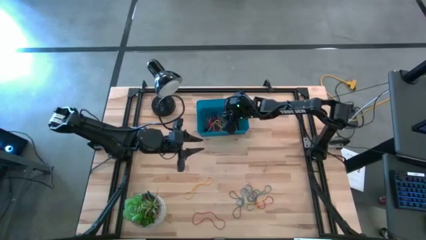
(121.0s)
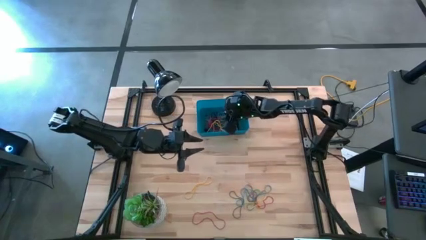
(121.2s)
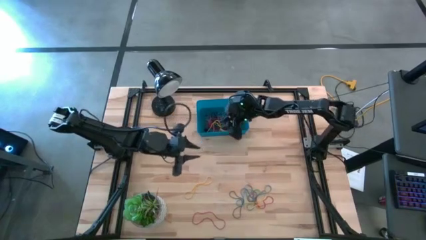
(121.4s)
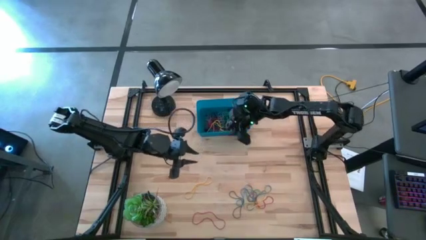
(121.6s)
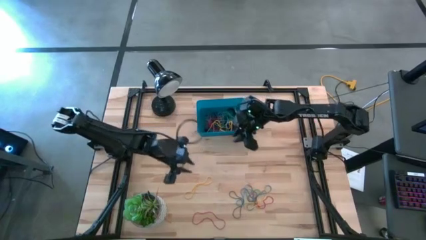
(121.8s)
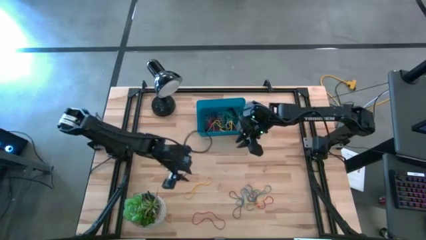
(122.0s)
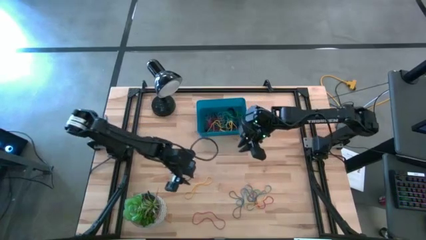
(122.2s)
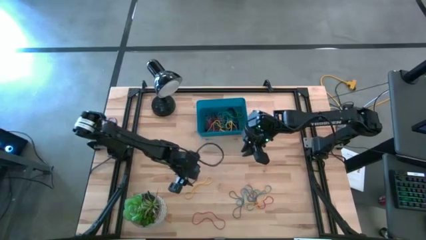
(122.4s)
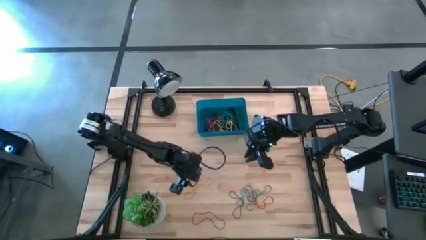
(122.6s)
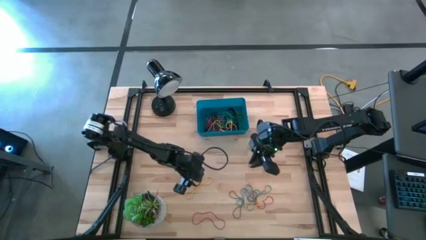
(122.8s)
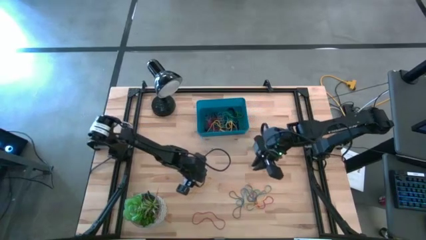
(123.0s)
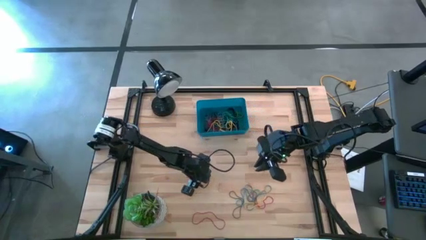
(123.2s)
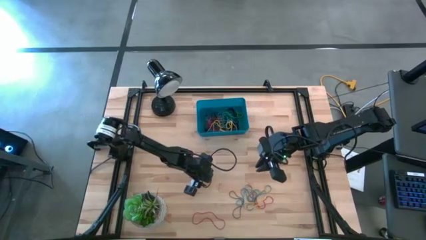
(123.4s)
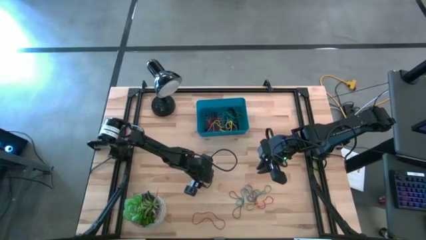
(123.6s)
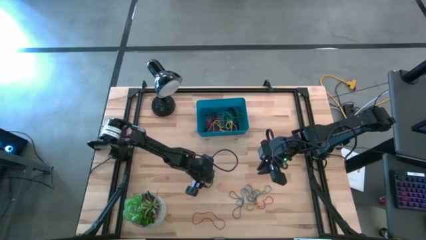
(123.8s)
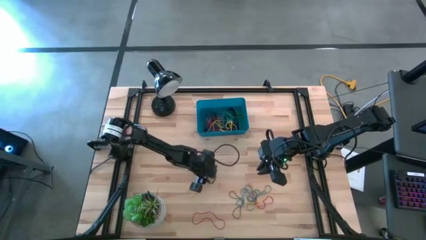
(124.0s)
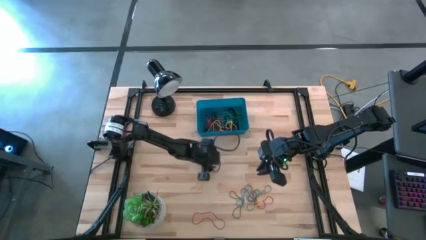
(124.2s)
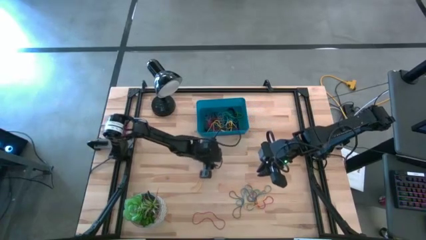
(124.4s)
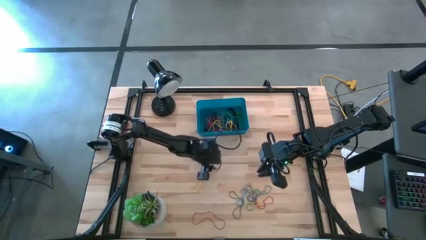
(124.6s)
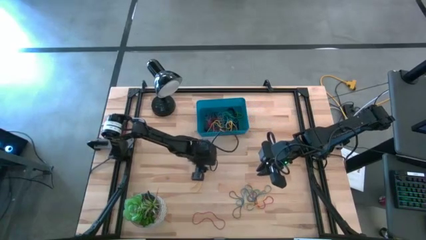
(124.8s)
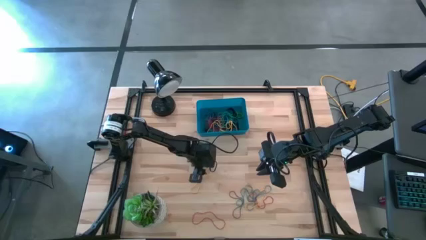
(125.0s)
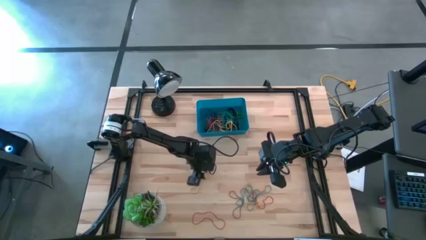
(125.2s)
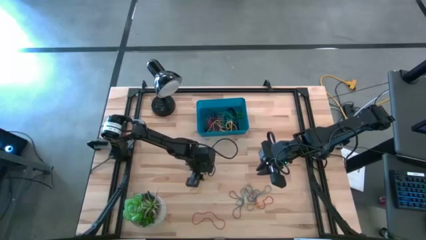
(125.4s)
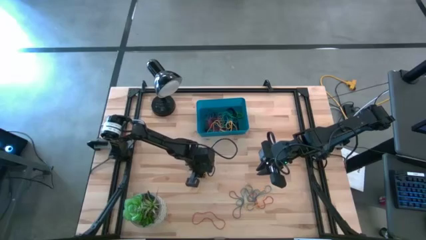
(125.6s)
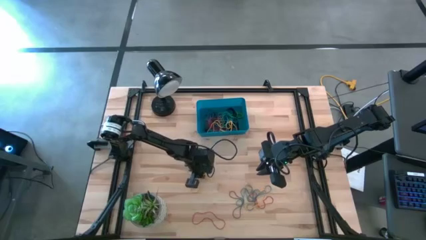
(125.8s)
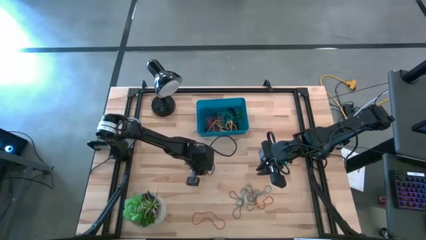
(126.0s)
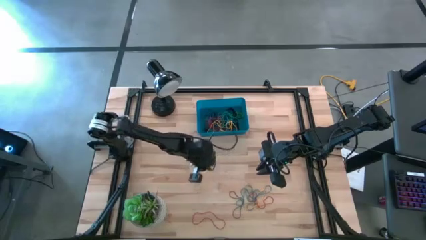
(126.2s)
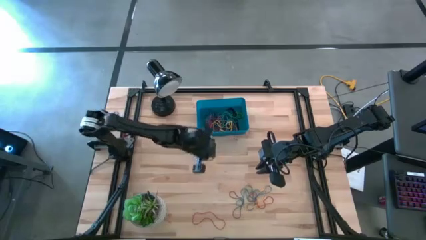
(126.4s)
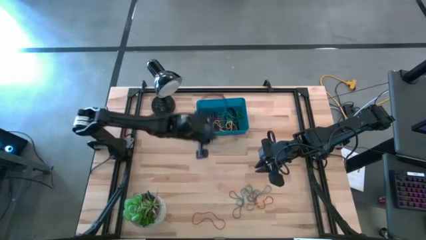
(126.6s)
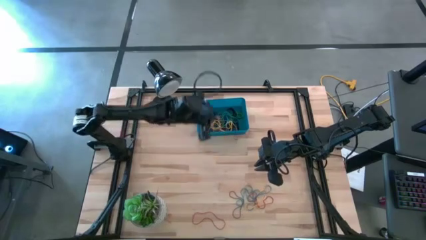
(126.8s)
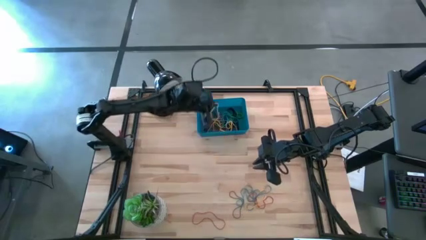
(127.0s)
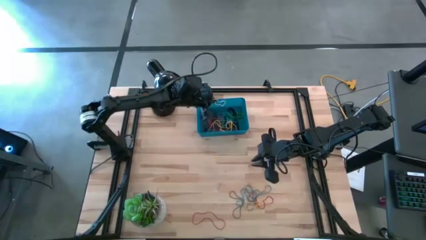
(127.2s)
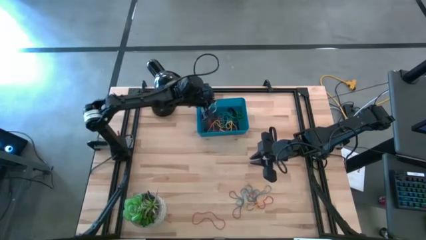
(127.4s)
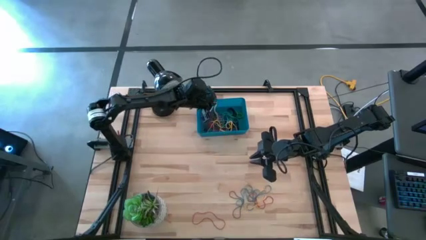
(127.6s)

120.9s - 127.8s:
Task: Pick and place rubber bands into bin
Put the yellow rubber band into the blue bin

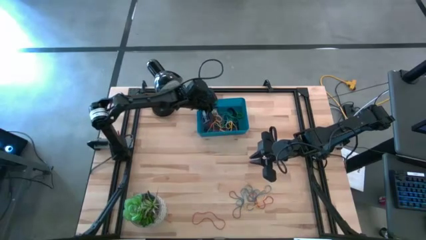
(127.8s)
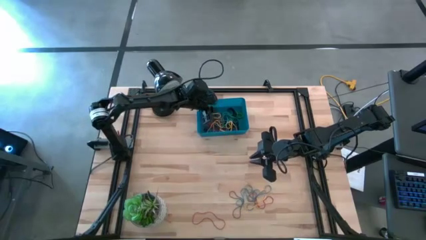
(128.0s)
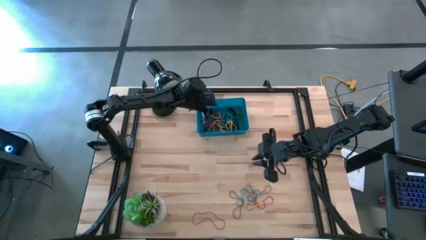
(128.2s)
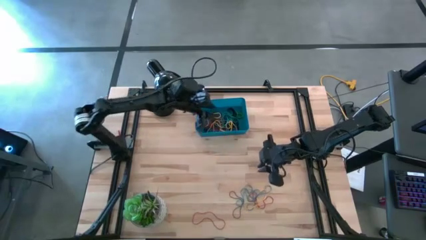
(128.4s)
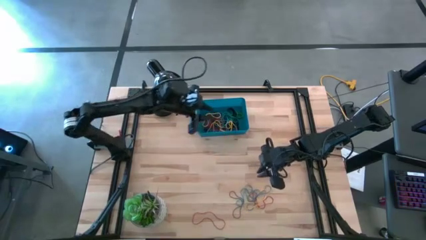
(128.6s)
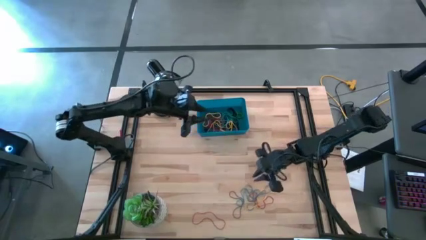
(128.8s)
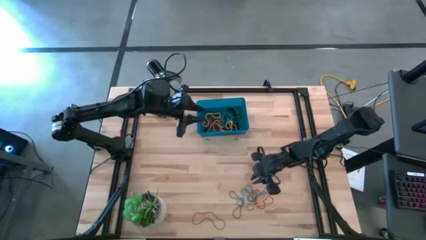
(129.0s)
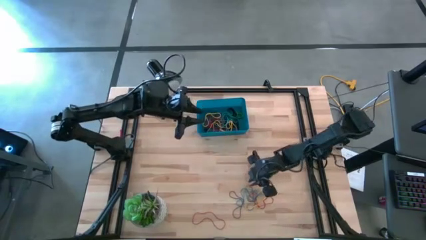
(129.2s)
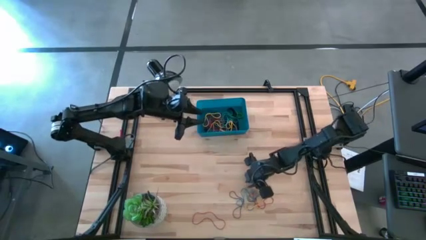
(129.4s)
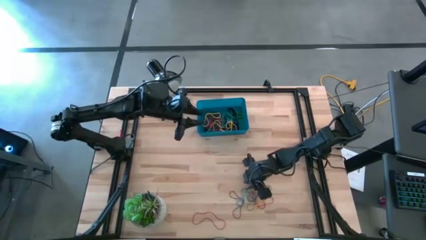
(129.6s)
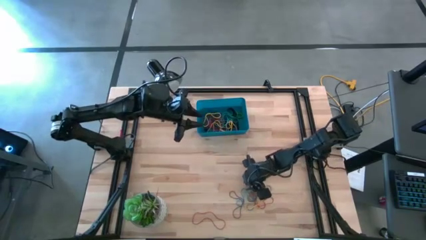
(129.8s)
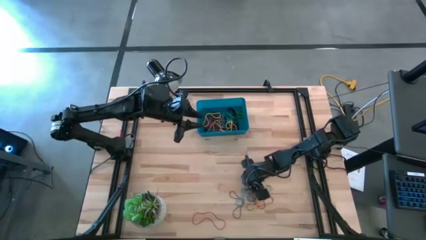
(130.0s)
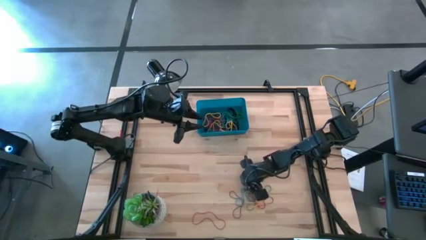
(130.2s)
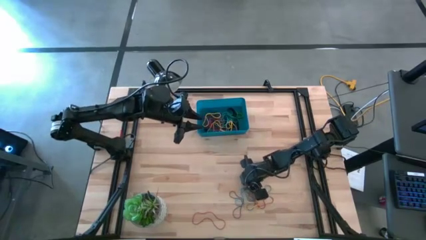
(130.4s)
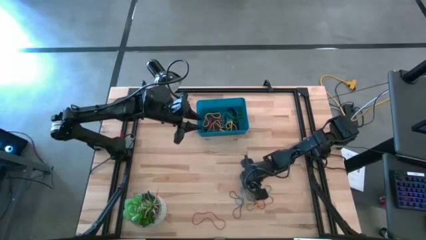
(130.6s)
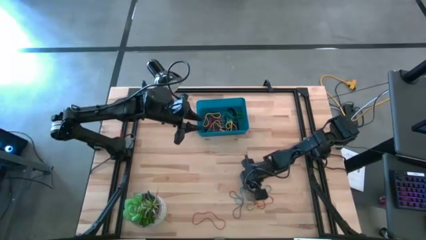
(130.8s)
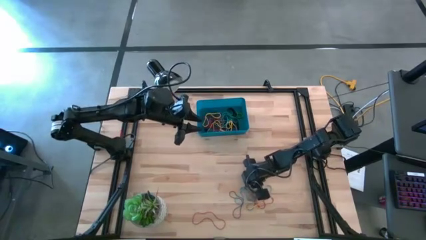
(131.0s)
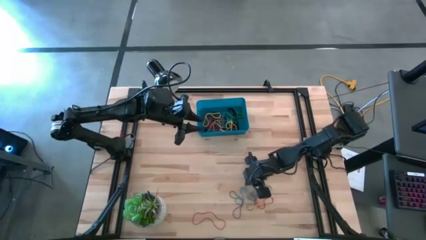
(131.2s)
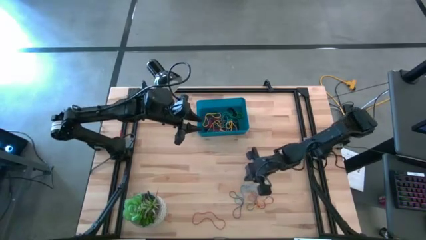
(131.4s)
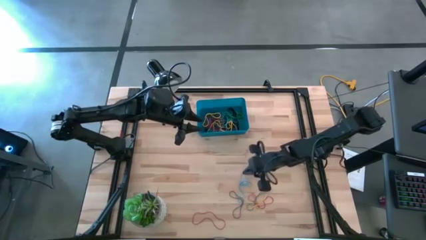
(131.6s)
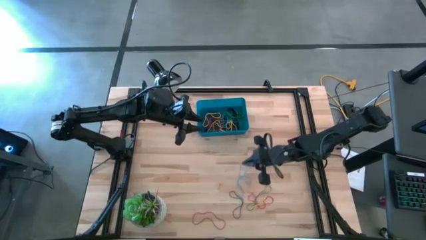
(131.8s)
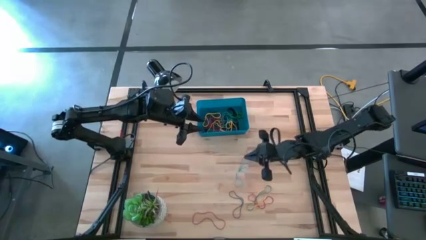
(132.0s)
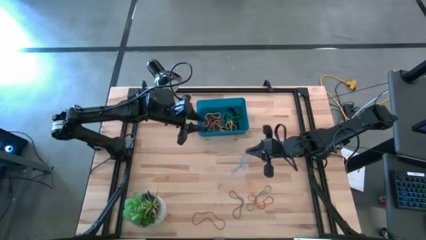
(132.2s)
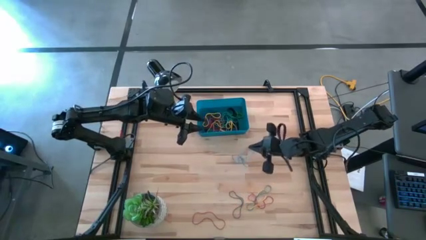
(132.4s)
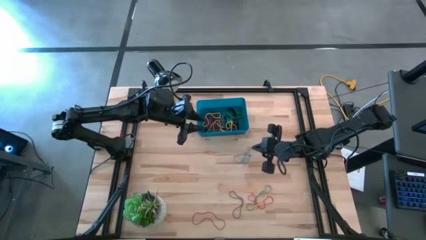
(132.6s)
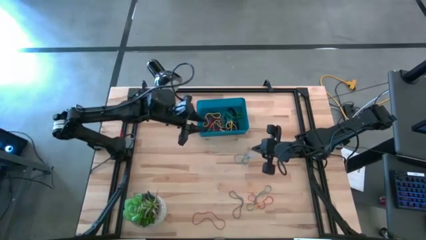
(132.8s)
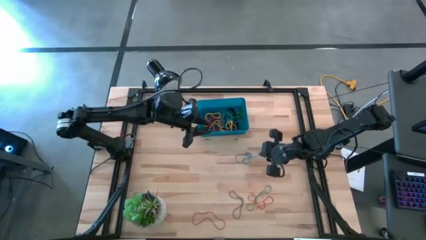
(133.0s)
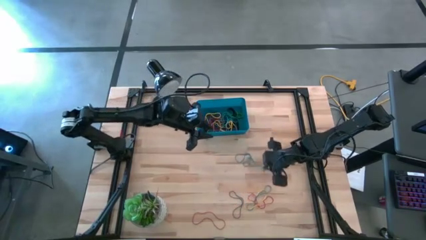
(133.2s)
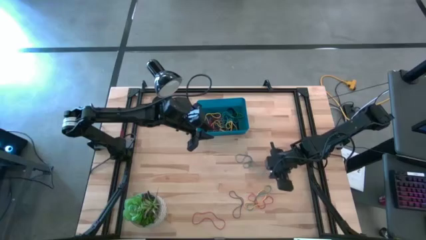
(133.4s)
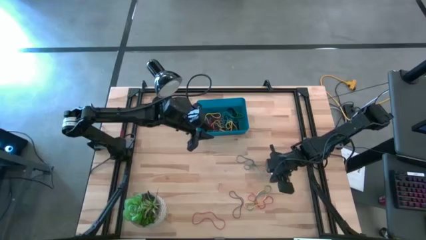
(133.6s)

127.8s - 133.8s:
Put the blue rubber band into the blue bin

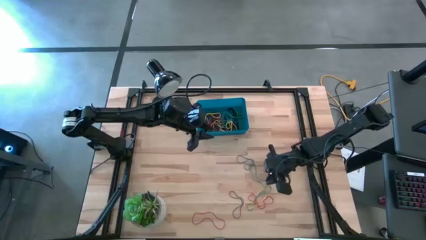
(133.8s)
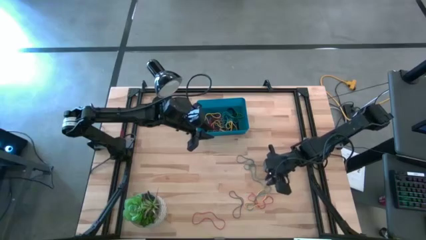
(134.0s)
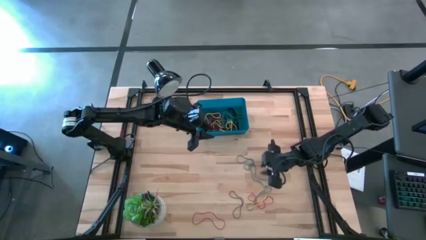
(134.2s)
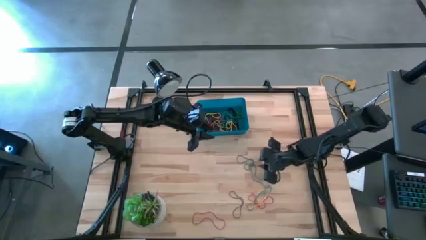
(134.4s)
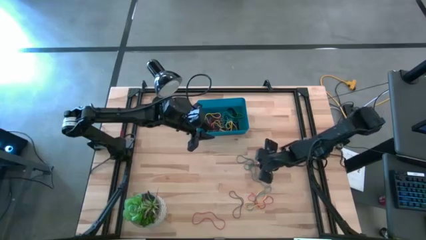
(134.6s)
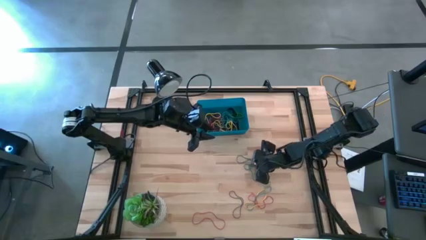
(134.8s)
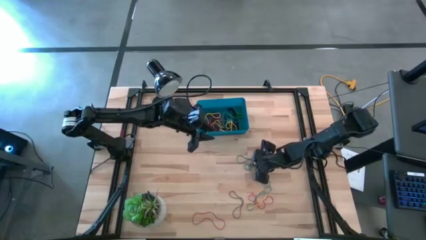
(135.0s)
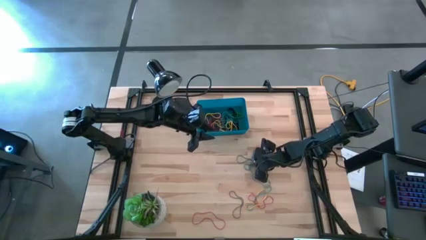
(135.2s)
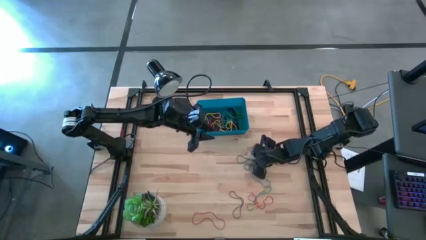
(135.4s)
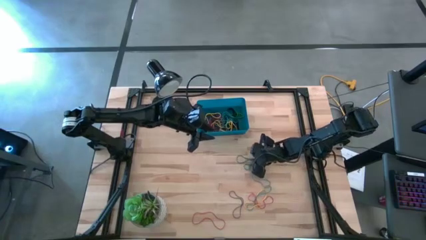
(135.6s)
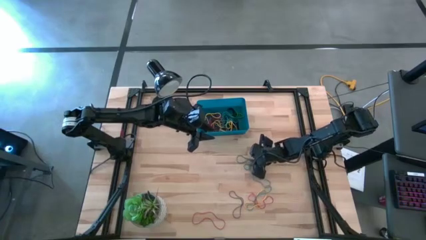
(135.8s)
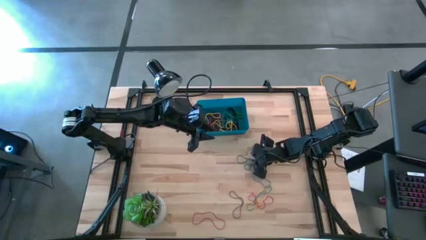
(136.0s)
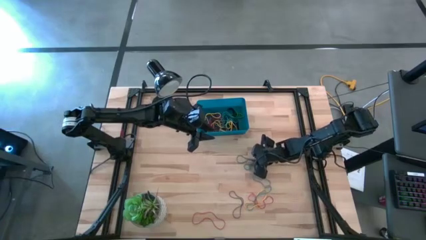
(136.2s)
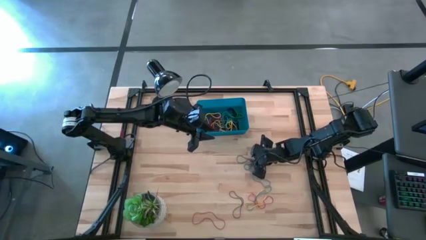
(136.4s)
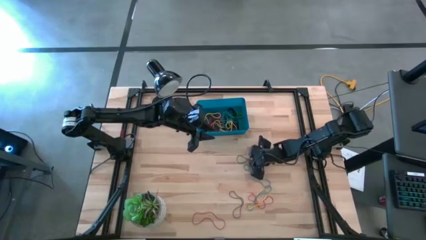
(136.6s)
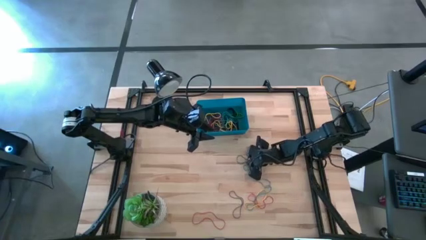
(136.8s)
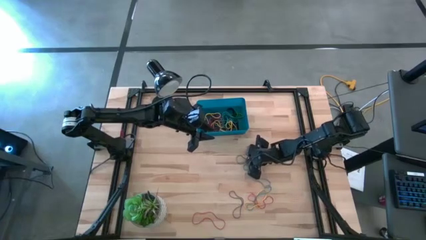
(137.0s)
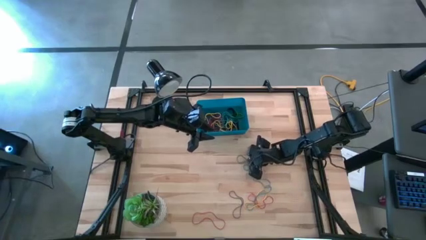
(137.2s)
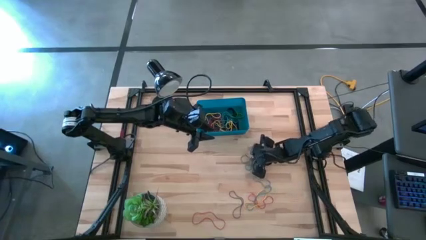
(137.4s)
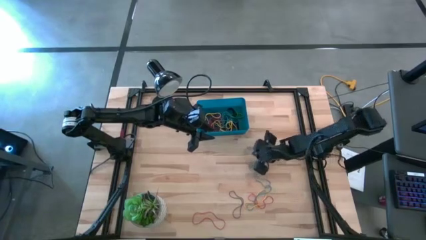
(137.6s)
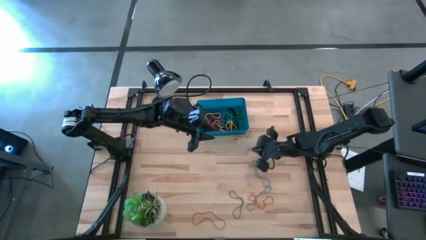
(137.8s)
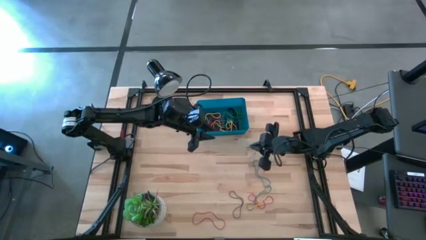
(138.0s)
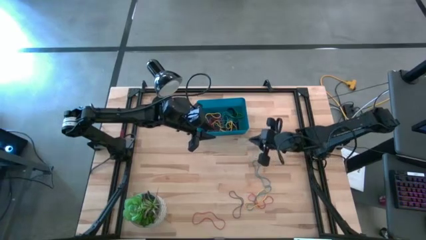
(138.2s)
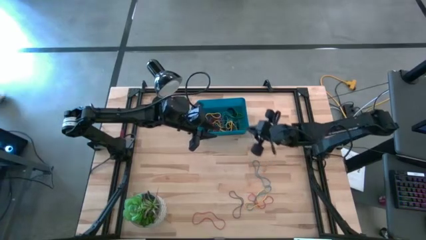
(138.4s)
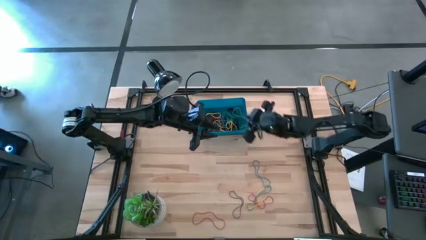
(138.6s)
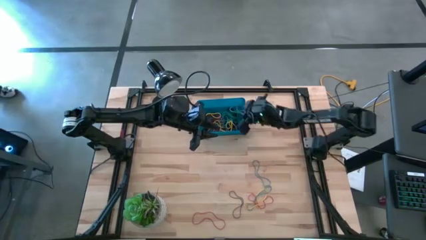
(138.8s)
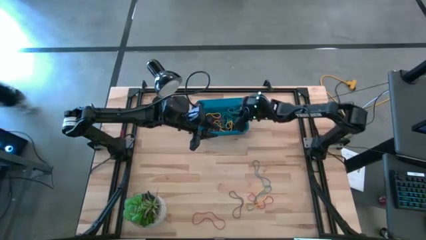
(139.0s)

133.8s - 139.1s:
Put the blue rubber band into the blue bin
